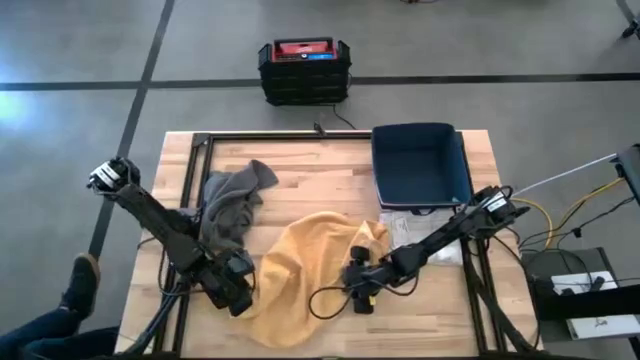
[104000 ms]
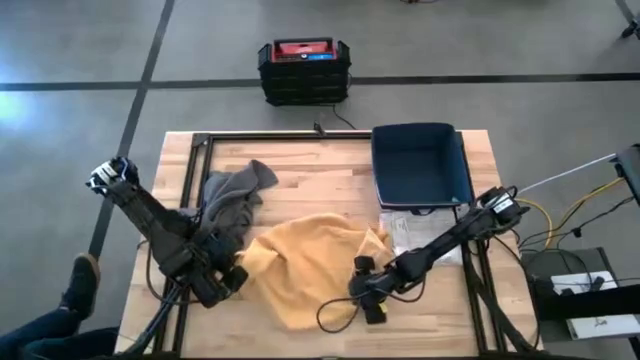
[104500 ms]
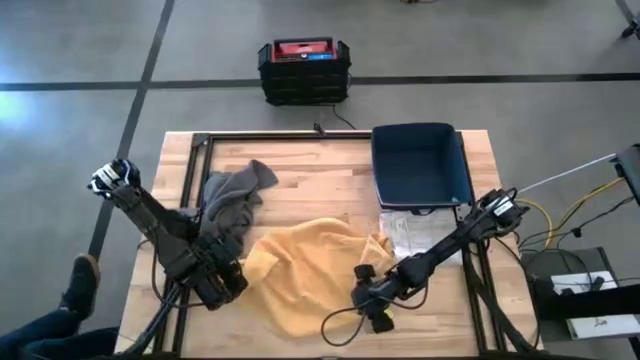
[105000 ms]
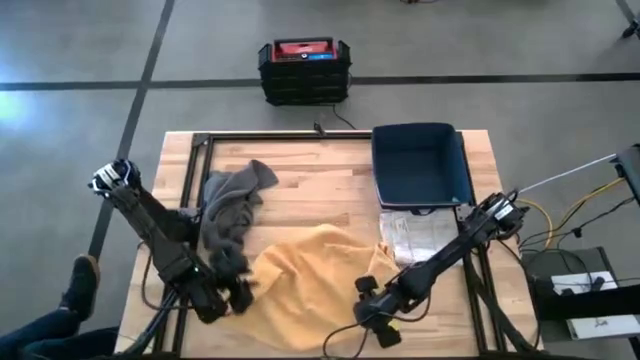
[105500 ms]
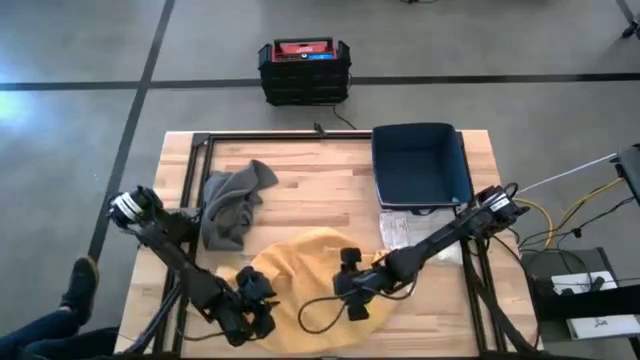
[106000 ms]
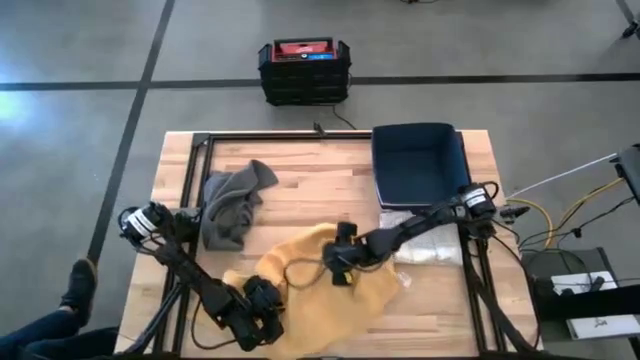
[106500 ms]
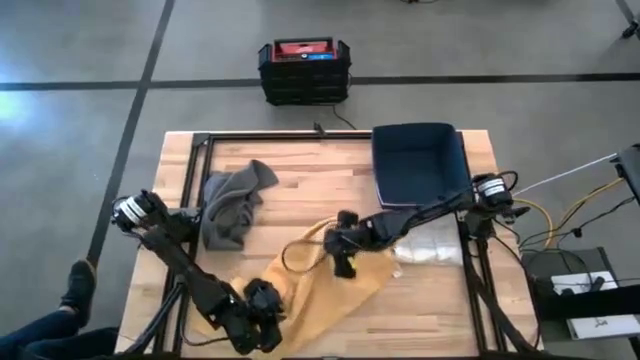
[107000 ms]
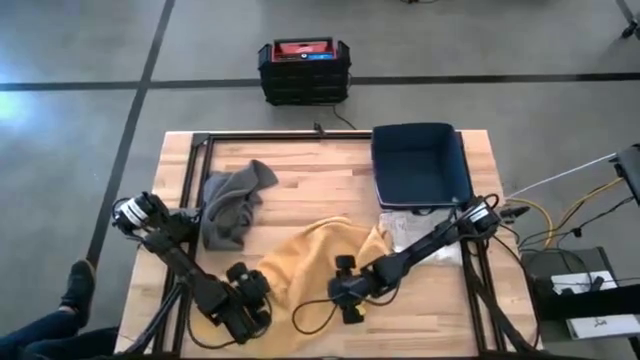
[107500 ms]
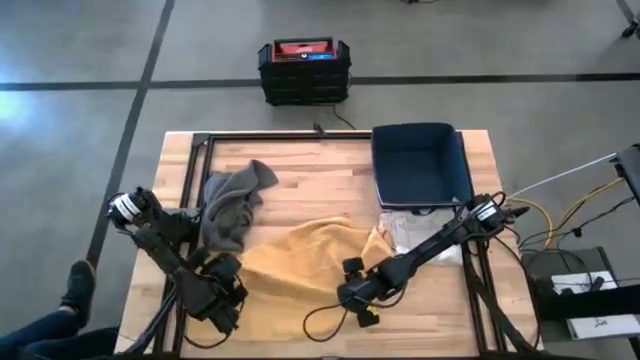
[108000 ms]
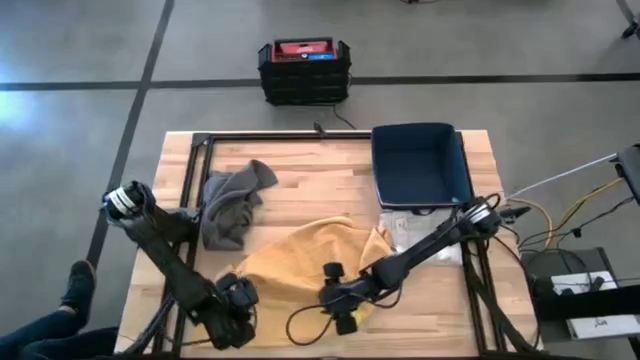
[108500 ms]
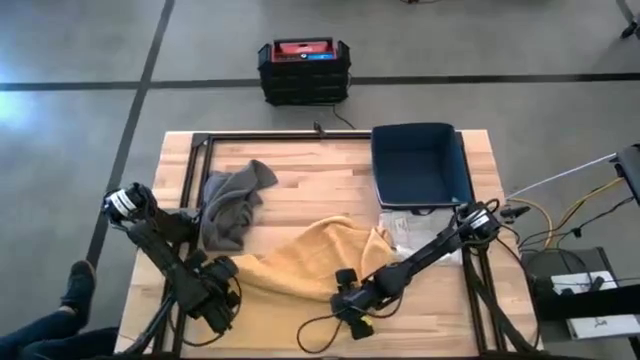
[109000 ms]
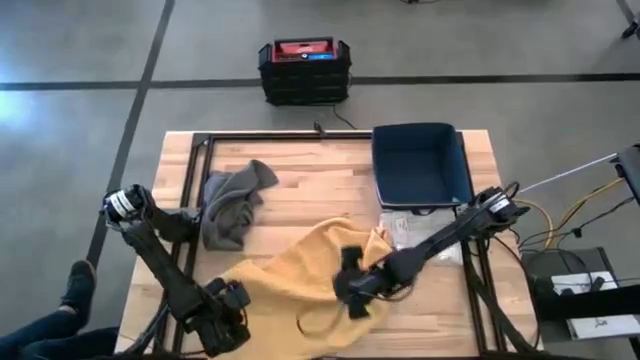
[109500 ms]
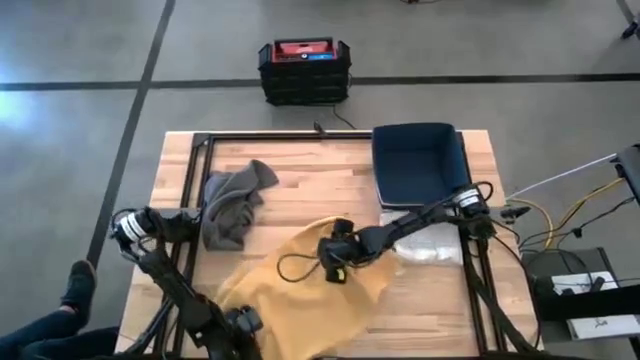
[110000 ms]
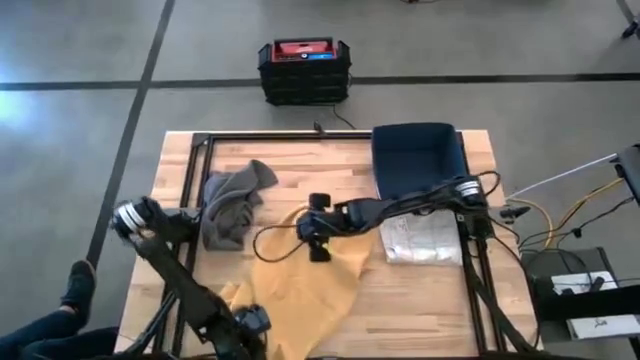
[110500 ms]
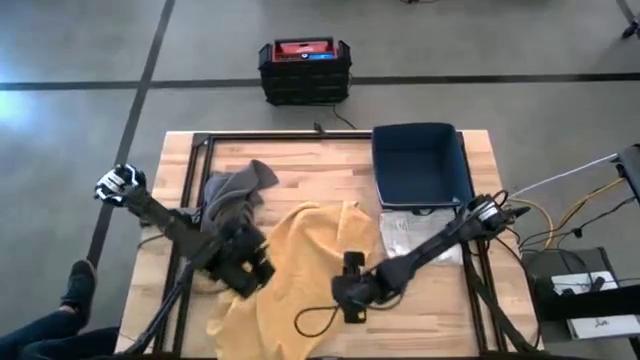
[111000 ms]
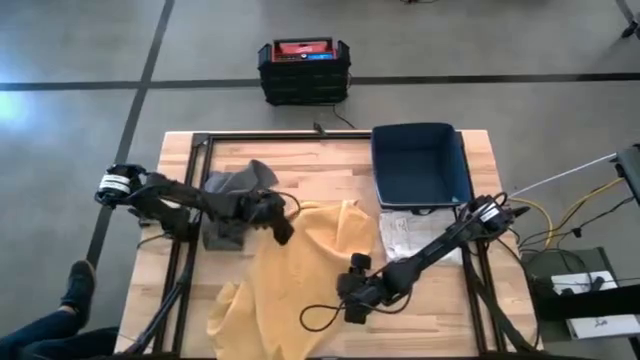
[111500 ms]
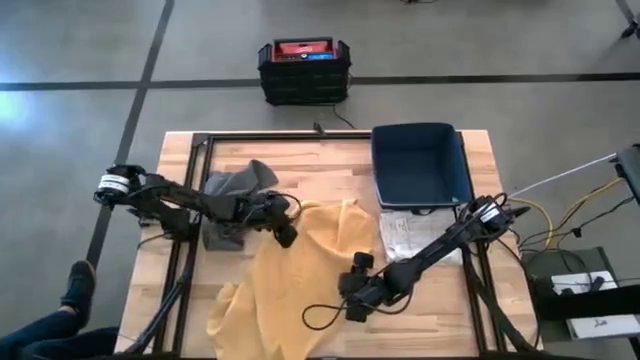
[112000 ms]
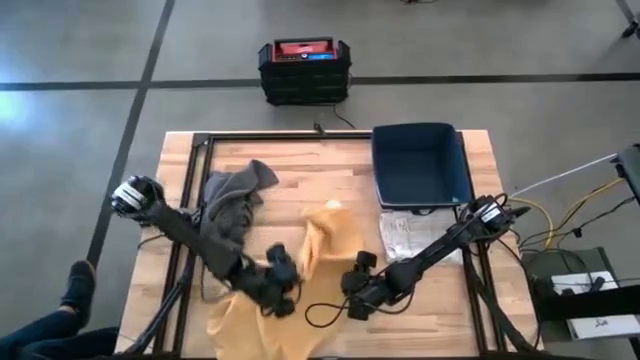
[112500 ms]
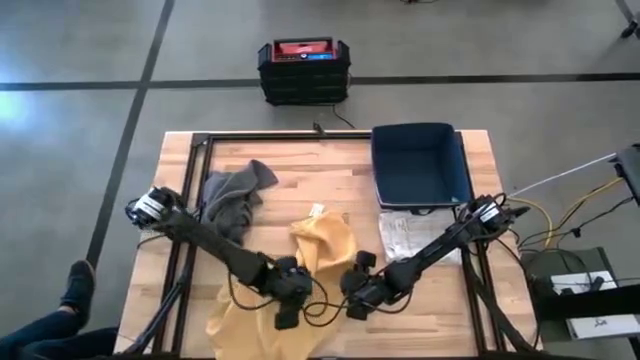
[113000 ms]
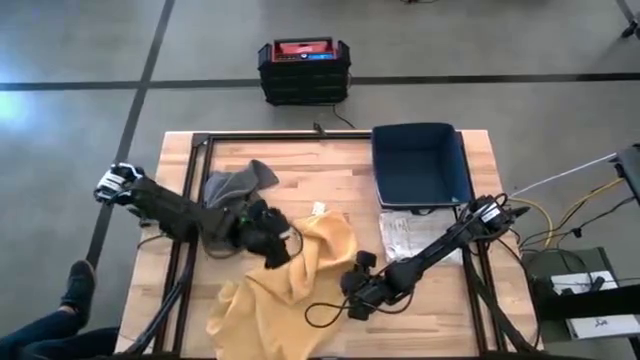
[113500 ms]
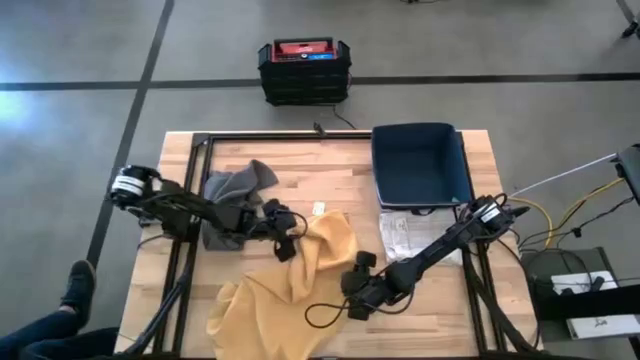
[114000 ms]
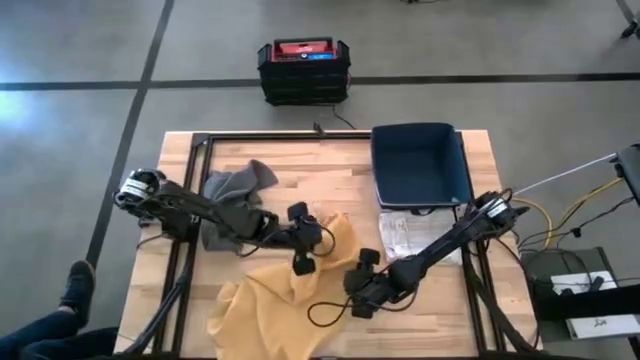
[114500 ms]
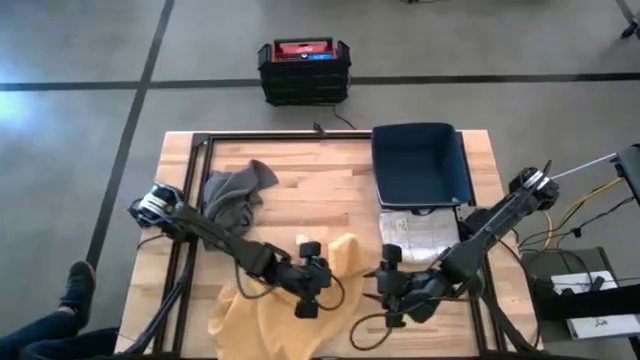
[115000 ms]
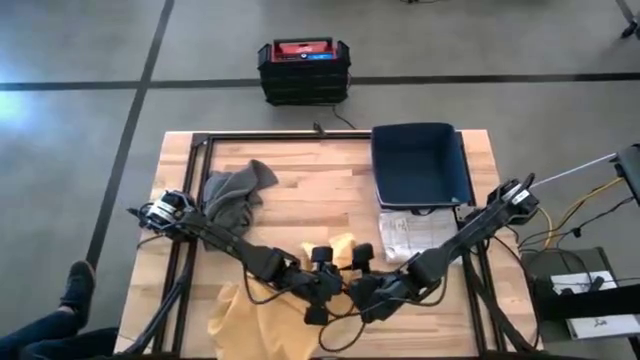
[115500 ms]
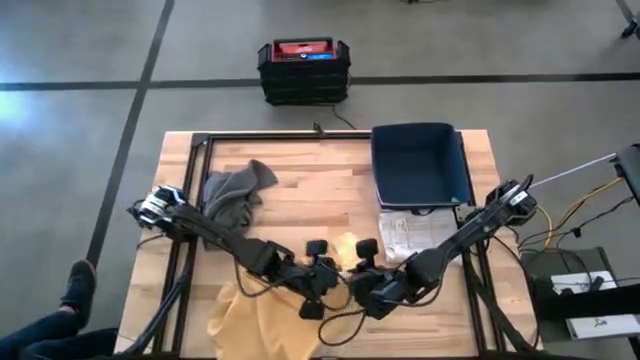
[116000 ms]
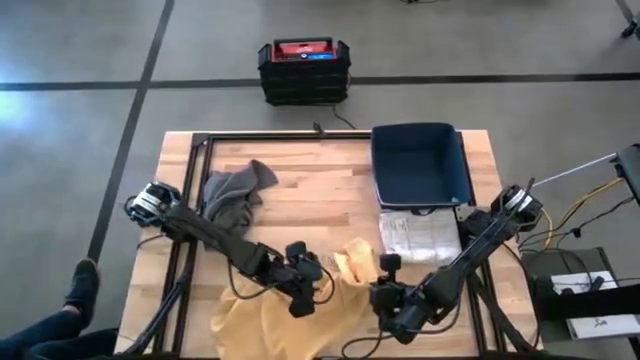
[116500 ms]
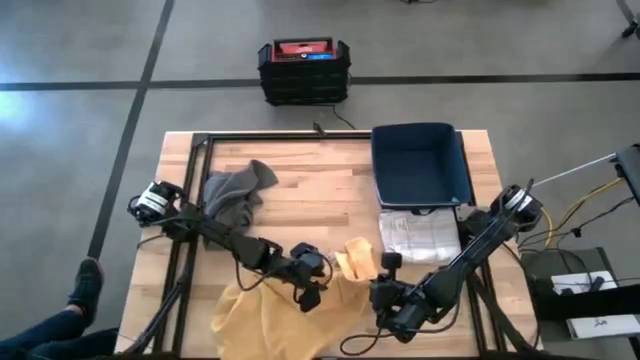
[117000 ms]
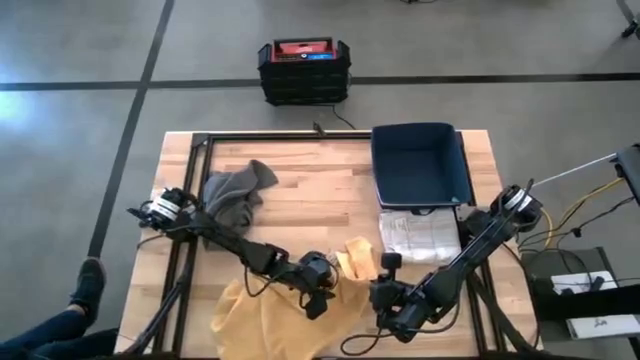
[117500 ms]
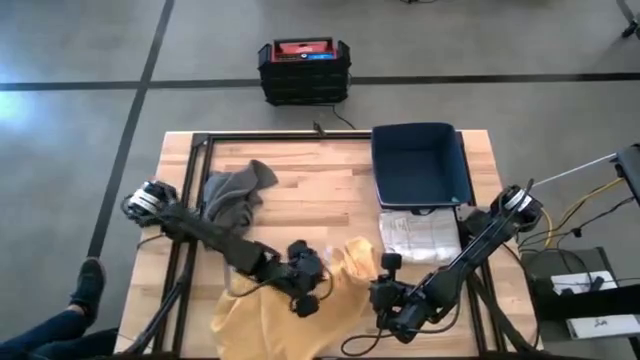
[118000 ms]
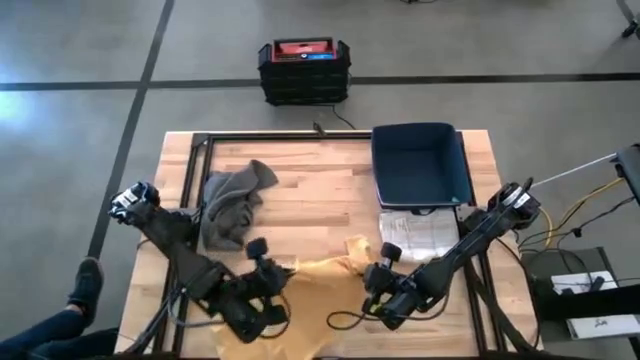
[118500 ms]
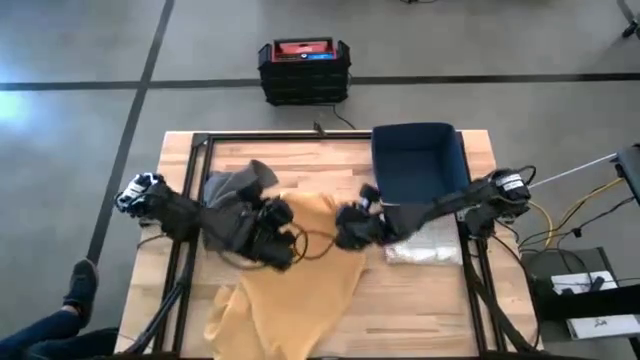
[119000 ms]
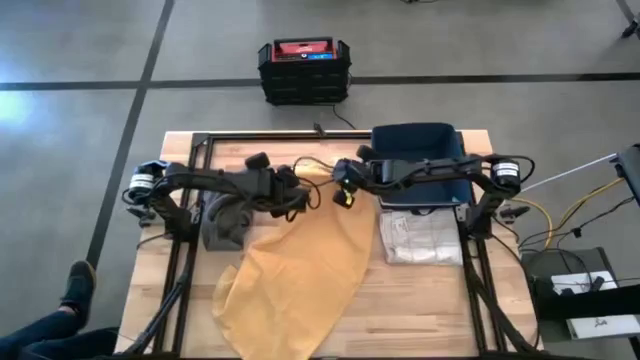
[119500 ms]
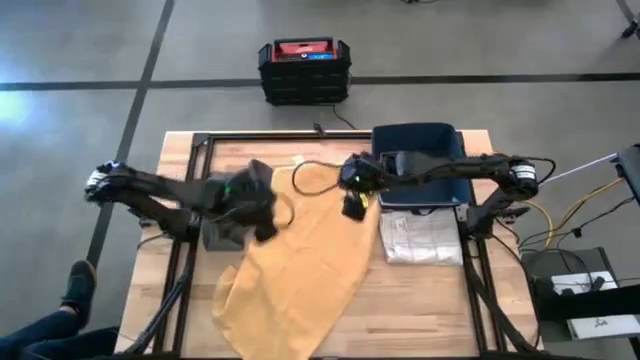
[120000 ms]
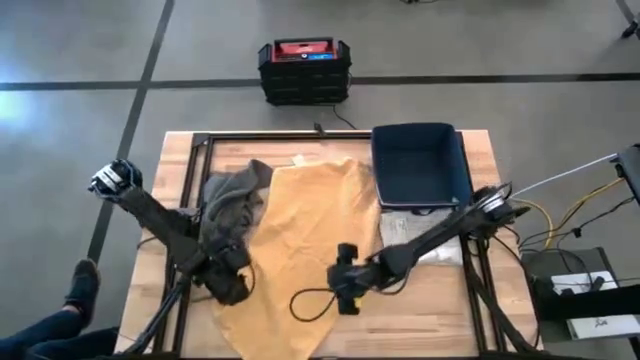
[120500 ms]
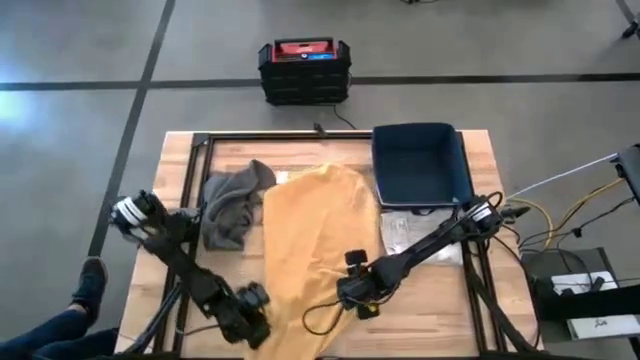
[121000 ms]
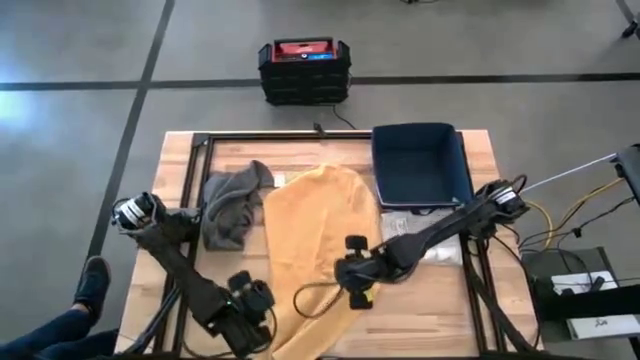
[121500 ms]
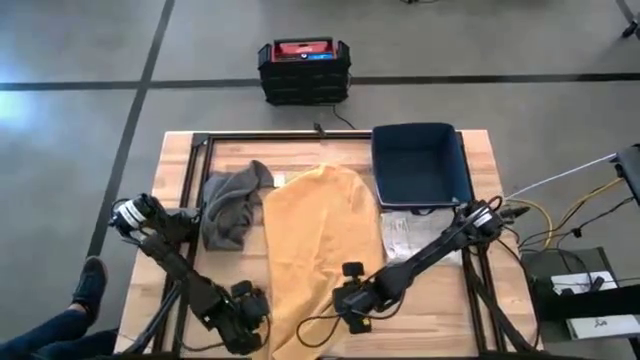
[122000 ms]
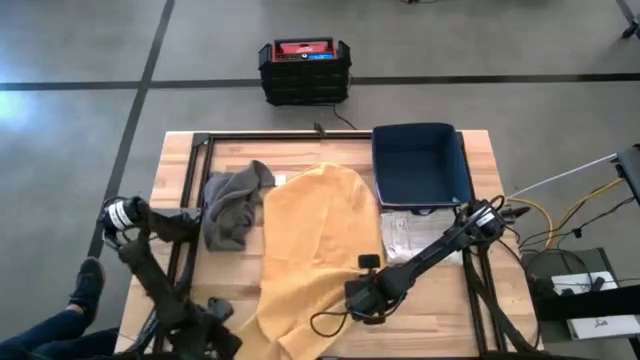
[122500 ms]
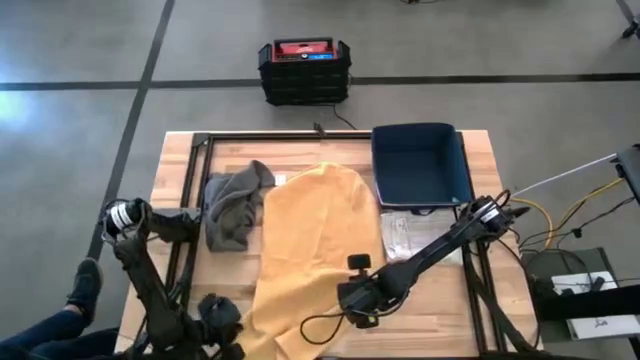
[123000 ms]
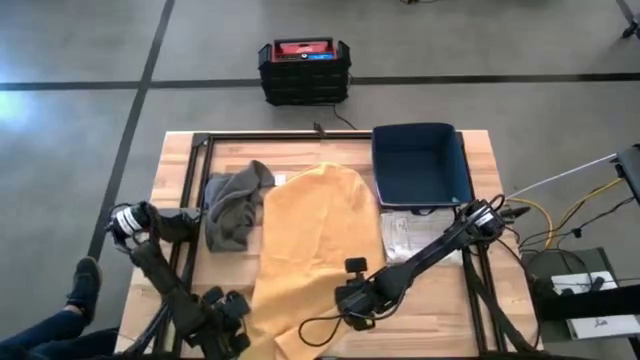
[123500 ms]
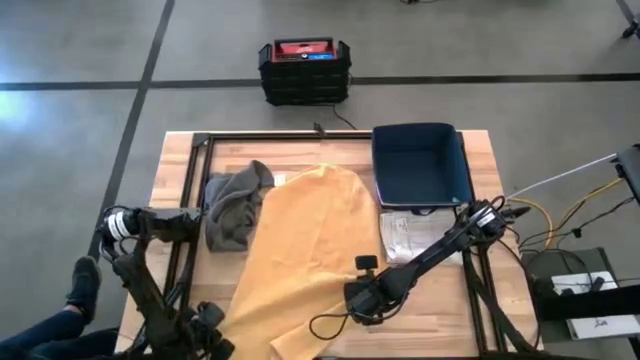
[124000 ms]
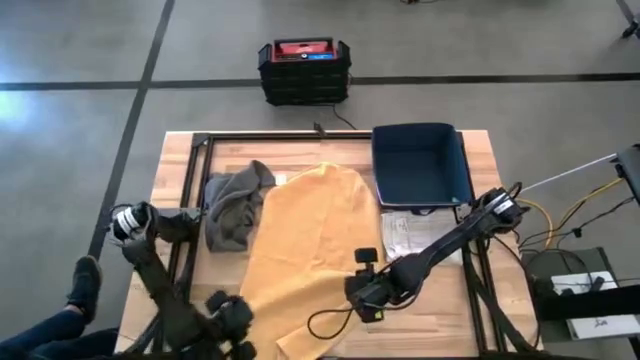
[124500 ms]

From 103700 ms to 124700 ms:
Task: Fold towel
Fold the yellow towel
